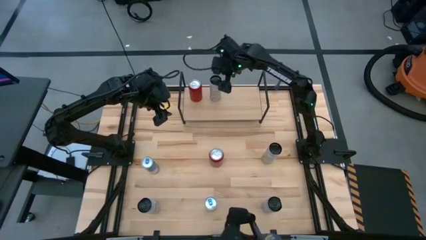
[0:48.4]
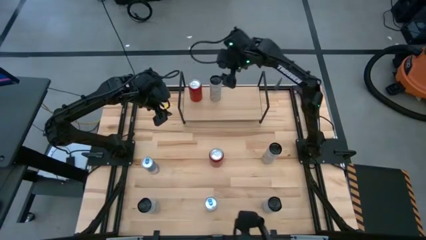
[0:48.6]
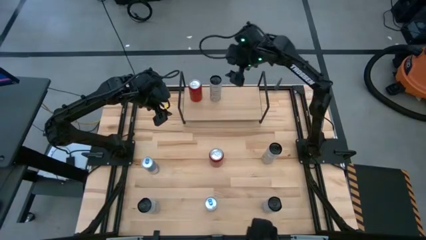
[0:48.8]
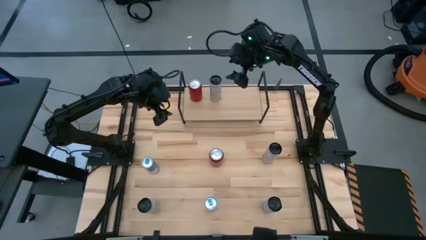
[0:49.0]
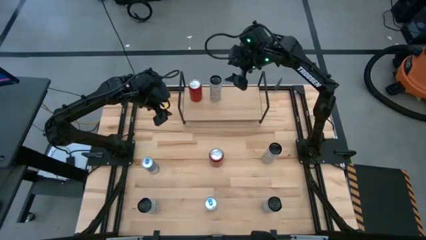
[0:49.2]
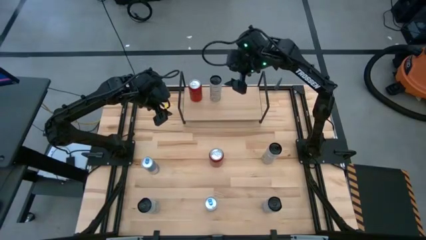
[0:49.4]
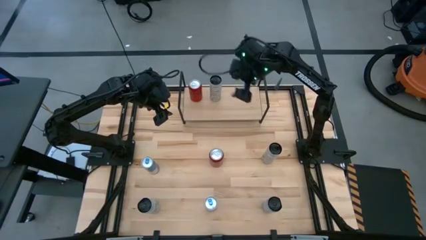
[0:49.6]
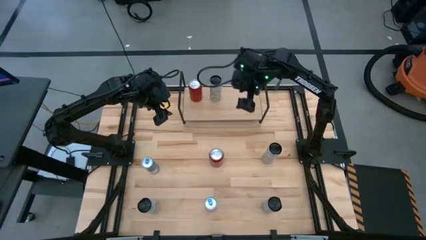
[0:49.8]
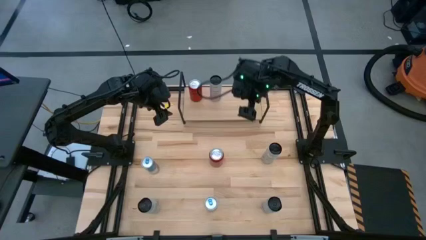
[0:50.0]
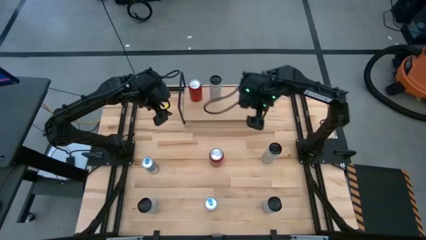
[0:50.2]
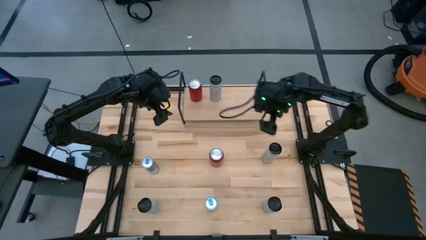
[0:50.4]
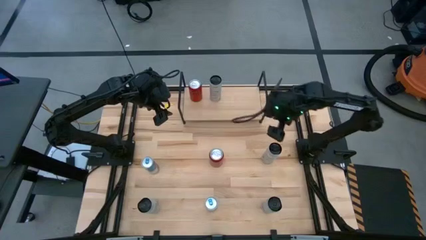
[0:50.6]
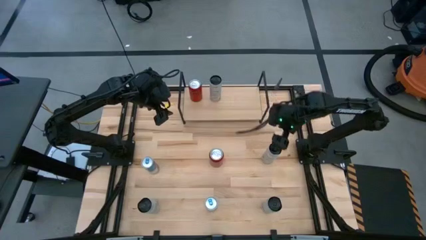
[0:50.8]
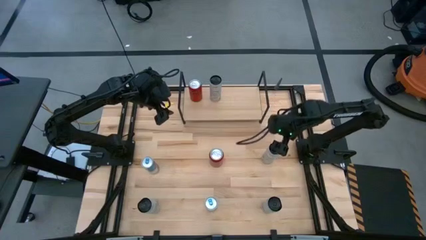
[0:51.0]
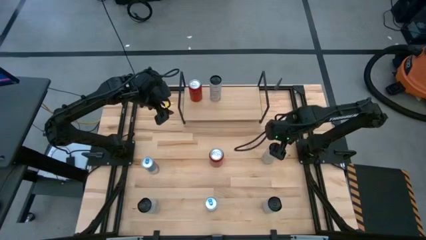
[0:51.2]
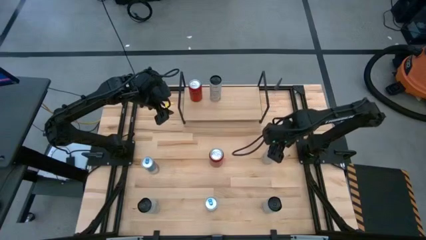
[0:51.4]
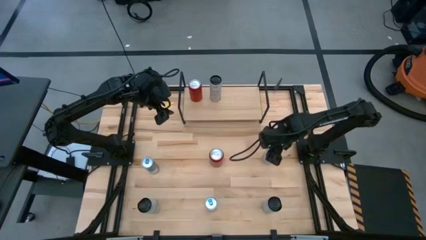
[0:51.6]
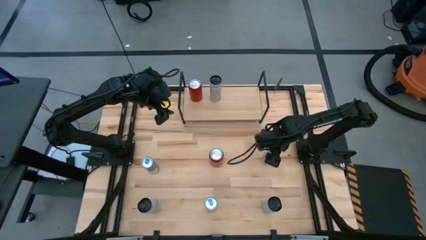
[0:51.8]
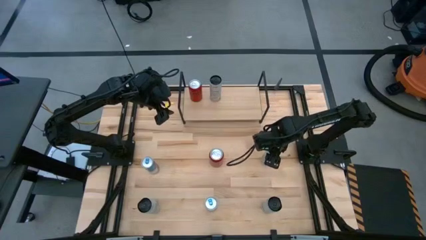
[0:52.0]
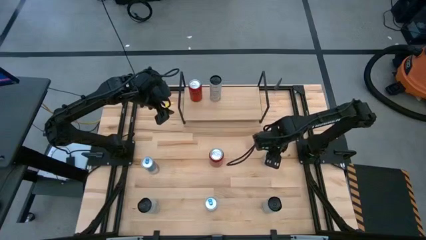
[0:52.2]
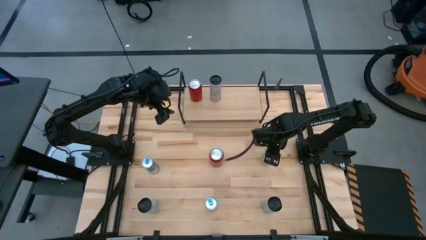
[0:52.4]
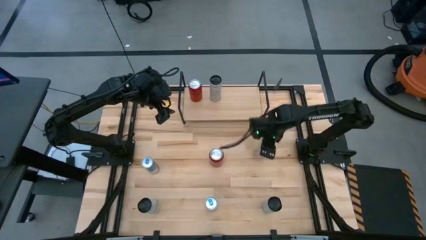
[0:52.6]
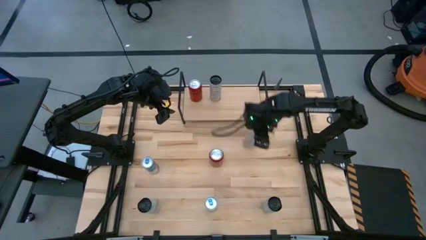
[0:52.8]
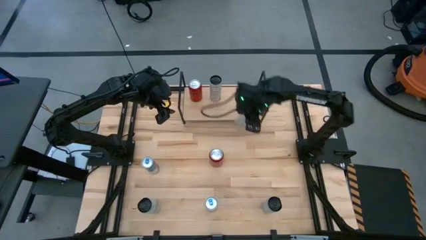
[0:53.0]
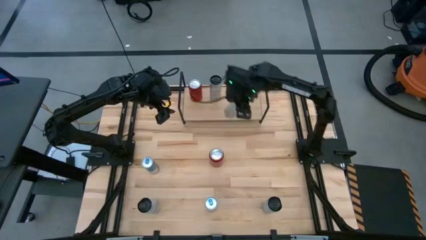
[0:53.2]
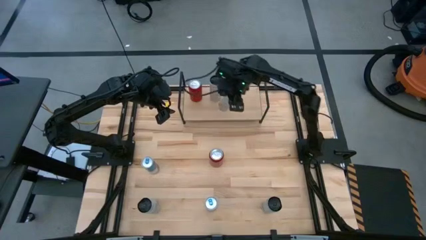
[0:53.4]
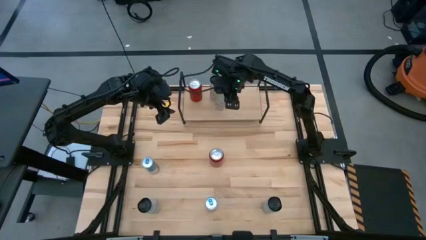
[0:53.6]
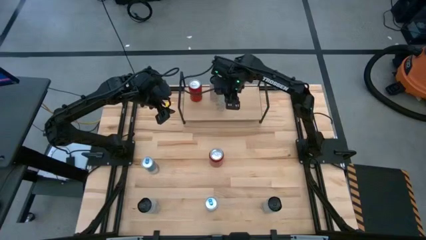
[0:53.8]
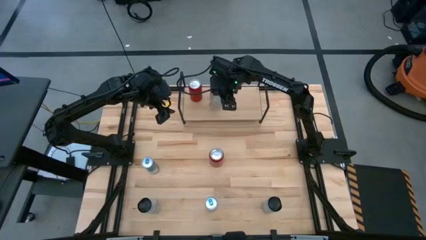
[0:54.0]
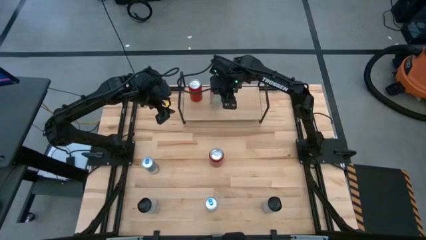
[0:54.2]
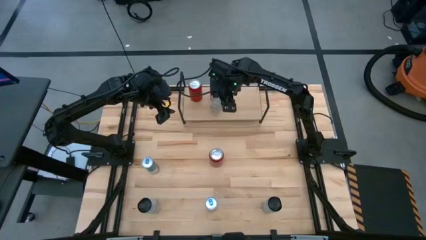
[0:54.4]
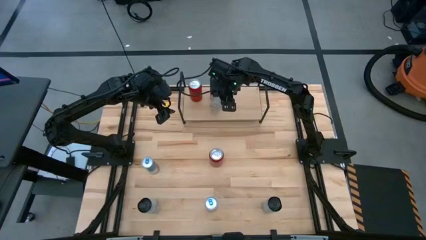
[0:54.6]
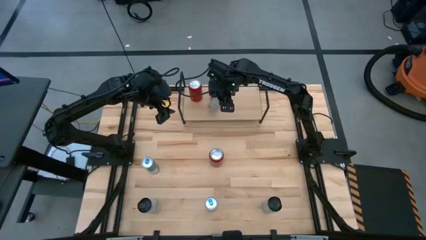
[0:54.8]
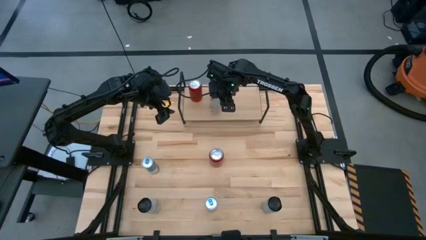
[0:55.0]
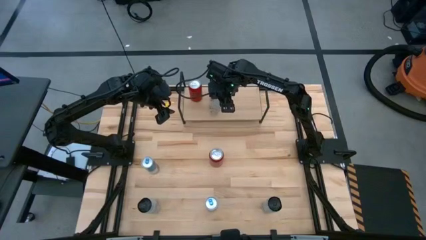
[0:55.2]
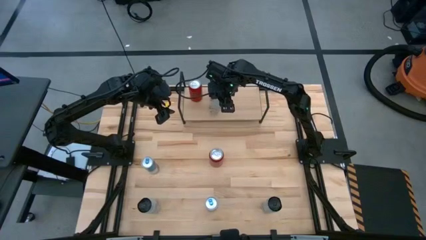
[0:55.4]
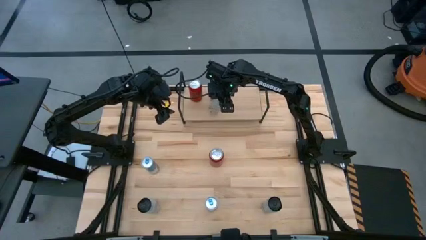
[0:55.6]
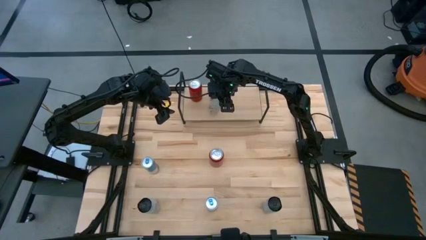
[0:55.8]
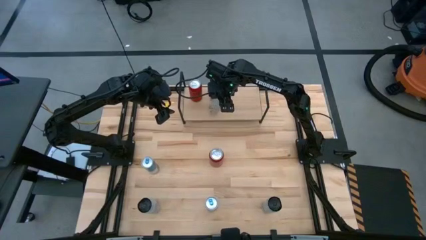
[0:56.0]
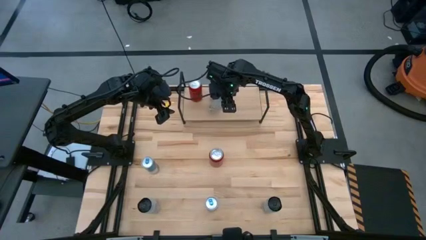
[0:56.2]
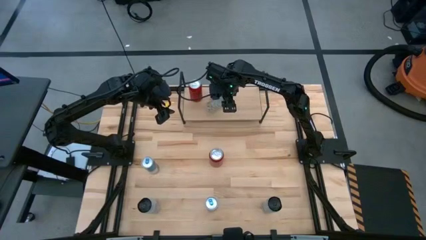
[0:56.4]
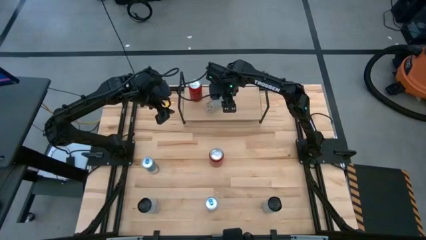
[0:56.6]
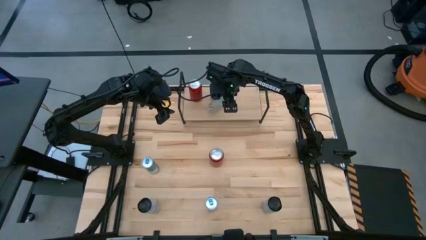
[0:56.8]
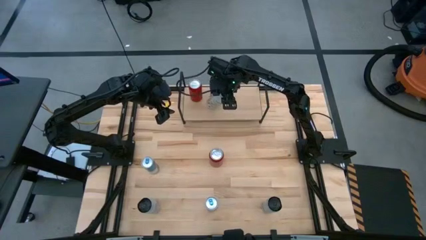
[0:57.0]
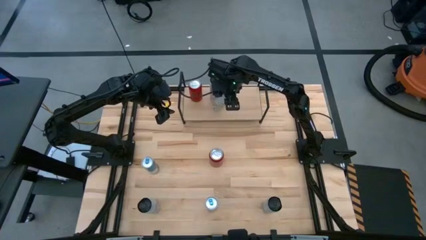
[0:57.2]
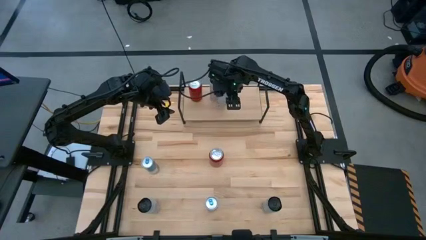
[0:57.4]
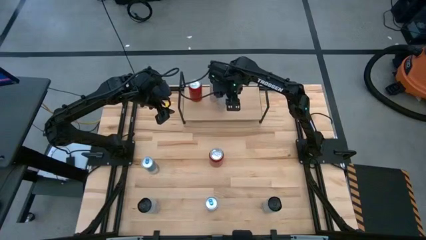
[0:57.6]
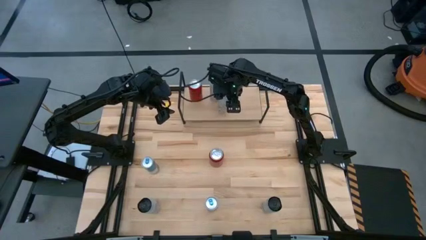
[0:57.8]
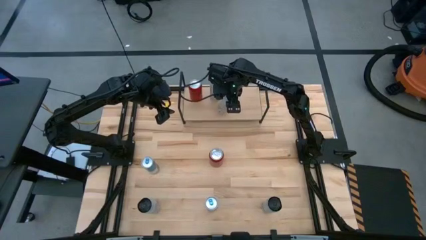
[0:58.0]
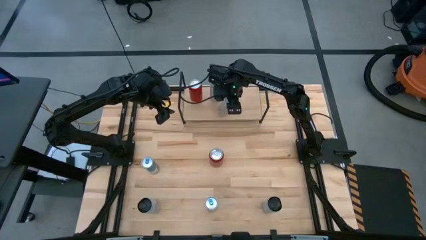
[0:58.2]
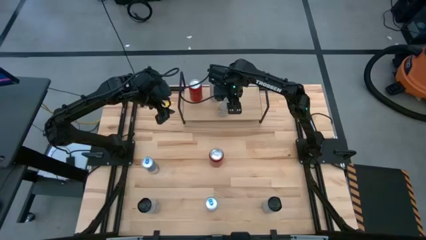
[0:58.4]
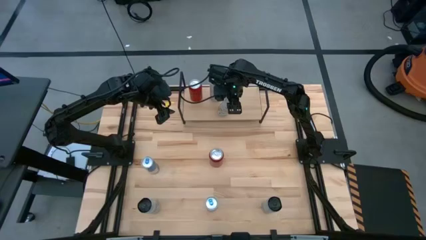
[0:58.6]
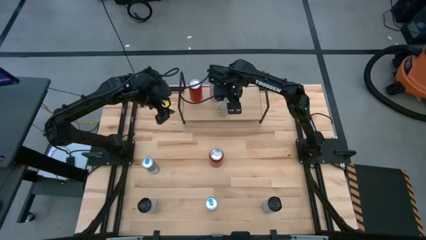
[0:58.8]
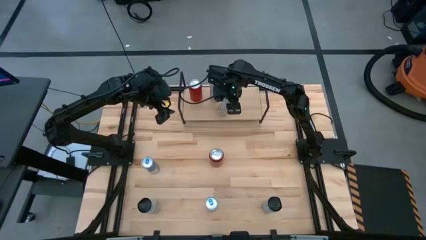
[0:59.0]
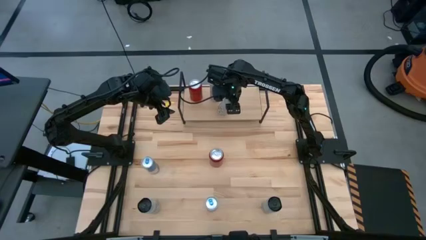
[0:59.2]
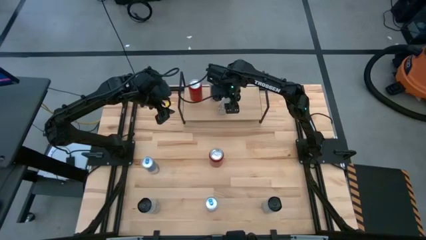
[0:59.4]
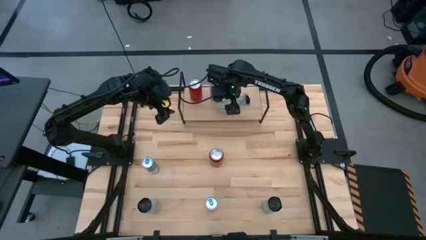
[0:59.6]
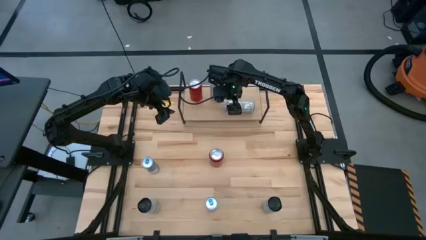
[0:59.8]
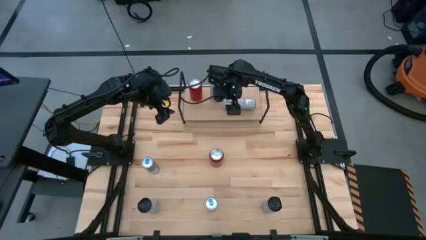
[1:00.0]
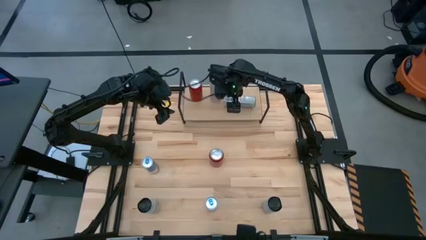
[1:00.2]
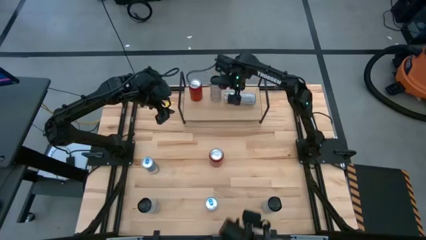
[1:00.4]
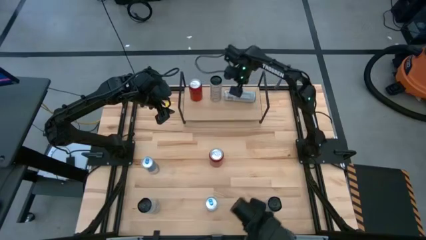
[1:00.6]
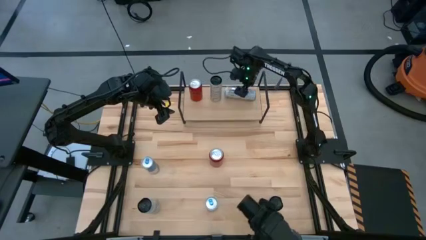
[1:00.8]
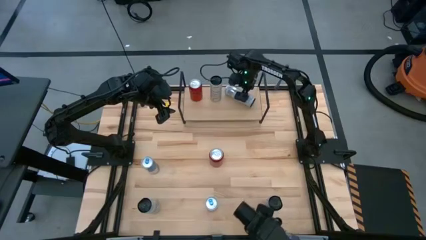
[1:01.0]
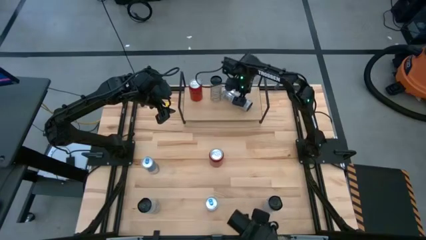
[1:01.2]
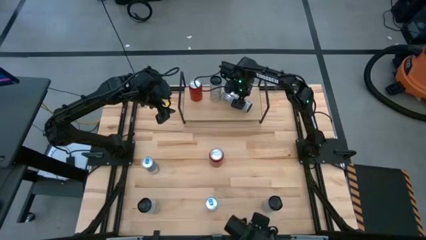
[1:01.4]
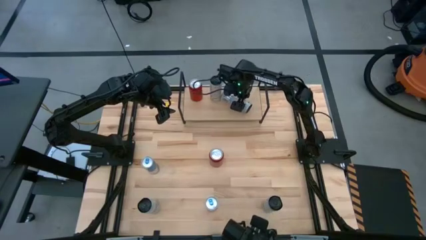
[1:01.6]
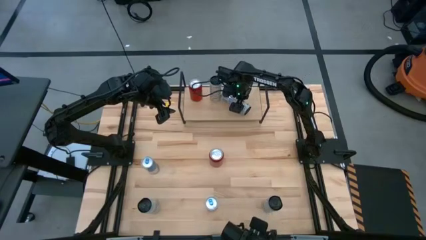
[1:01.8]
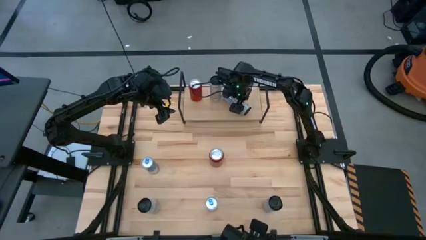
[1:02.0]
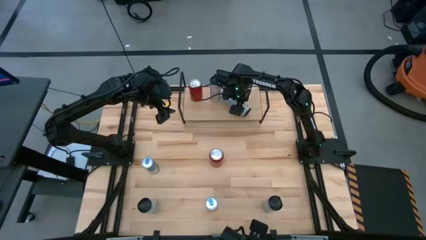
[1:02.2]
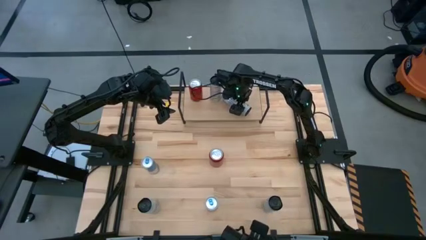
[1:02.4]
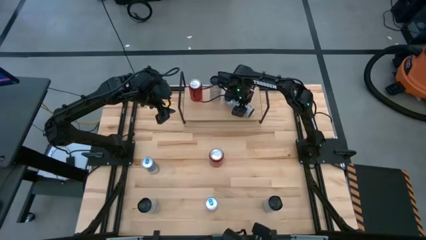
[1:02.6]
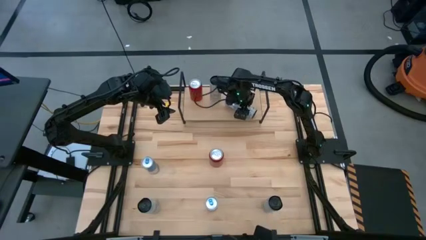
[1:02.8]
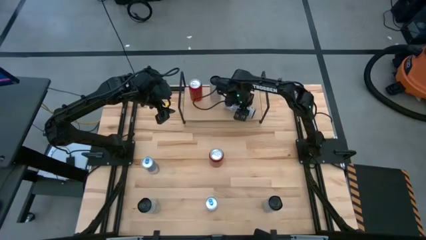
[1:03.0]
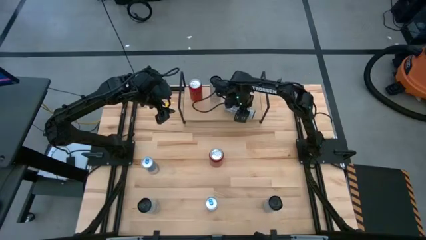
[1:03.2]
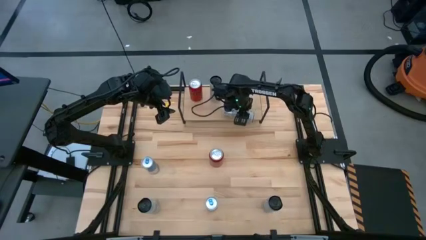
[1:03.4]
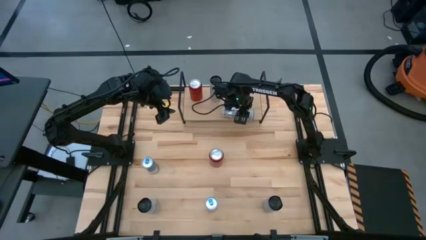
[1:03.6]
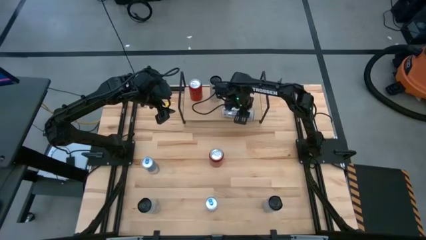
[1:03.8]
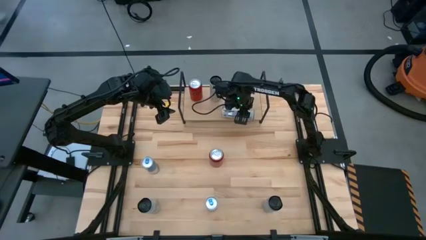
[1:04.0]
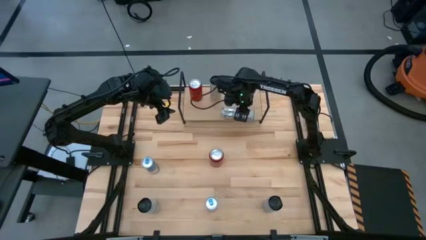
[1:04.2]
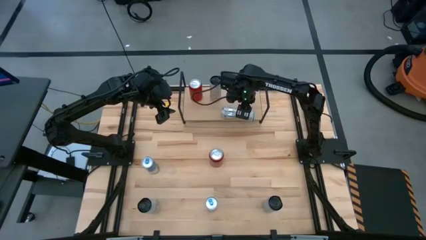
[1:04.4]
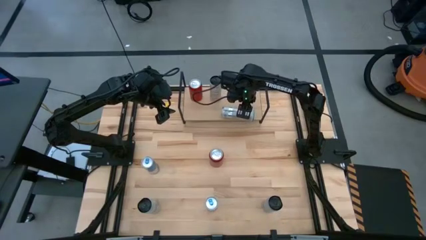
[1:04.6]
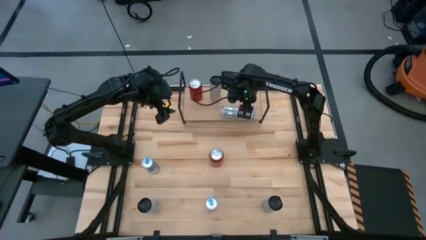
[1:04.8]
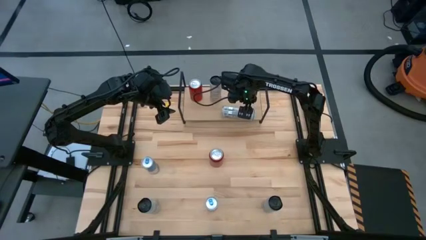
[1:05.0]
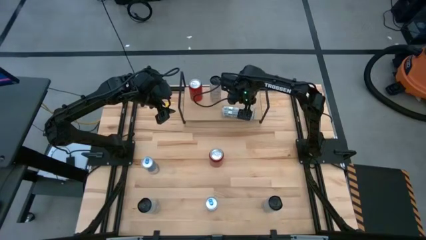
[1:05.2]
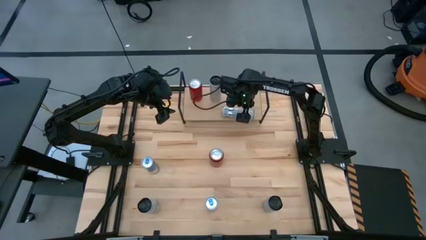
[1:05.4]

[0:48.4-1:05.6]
Task: Place canned beverage on shelf
Put the white yellow soda can aligned with the other white yellow soda can on the shelf
